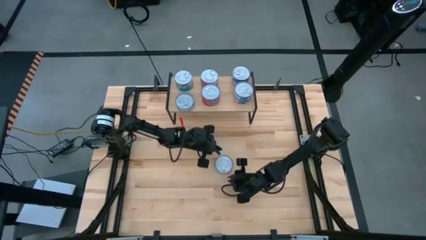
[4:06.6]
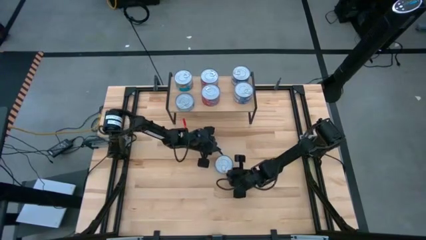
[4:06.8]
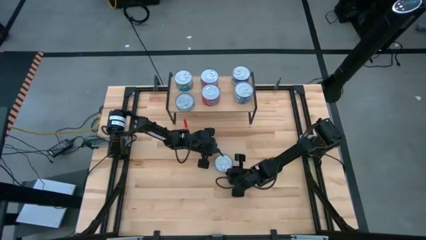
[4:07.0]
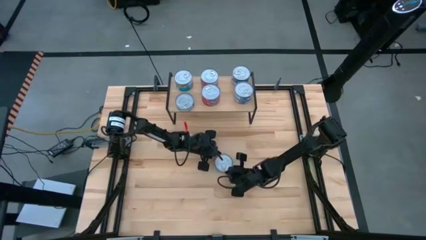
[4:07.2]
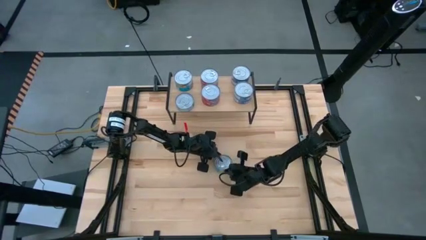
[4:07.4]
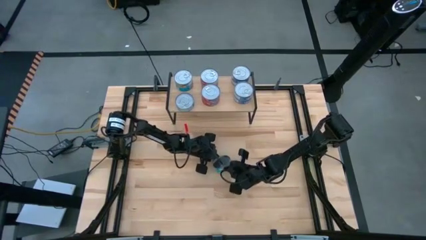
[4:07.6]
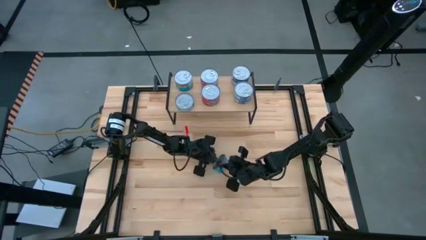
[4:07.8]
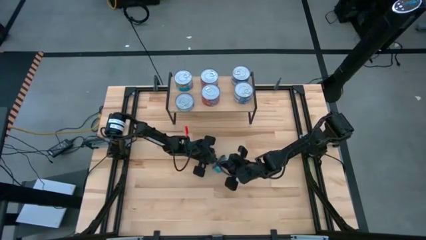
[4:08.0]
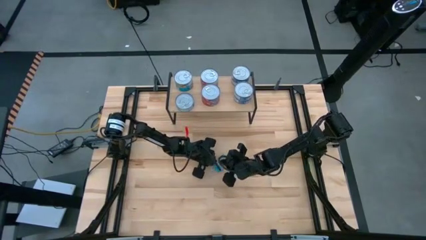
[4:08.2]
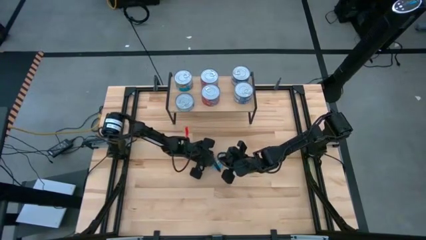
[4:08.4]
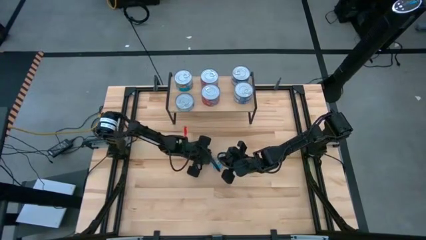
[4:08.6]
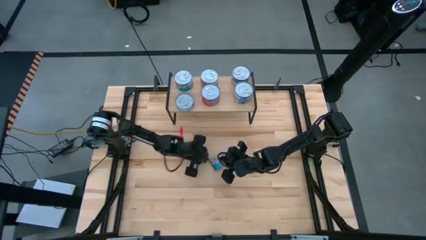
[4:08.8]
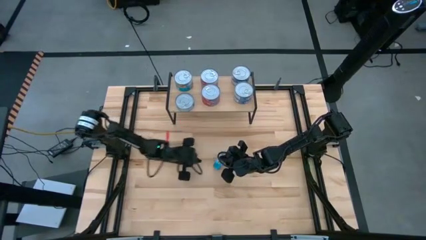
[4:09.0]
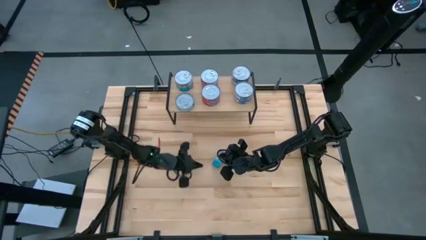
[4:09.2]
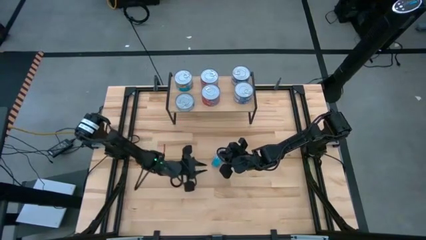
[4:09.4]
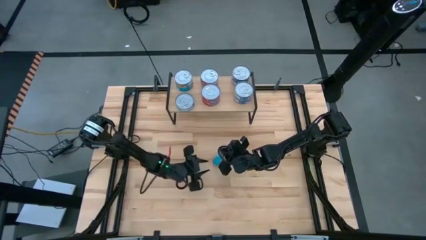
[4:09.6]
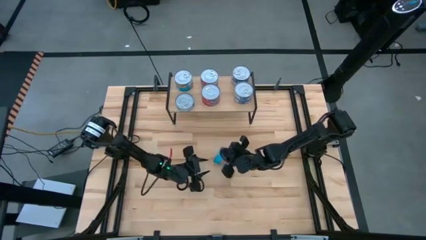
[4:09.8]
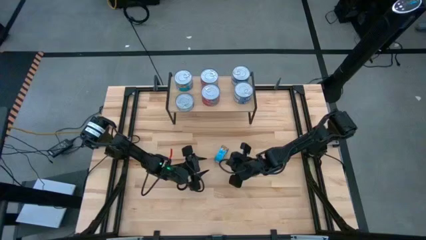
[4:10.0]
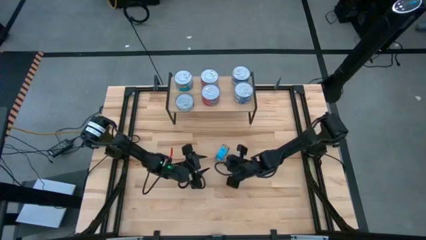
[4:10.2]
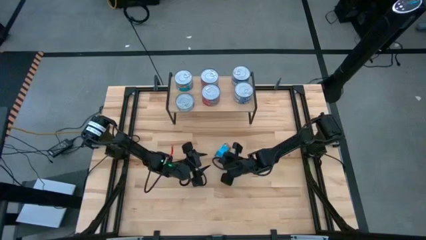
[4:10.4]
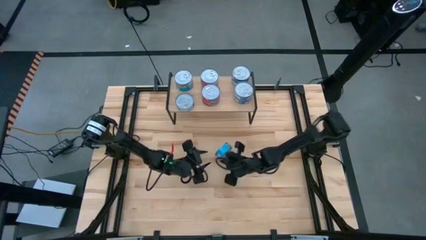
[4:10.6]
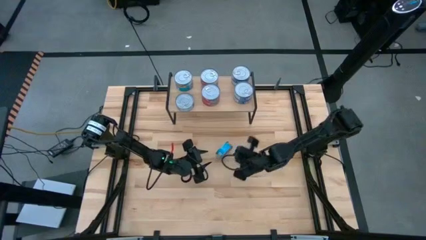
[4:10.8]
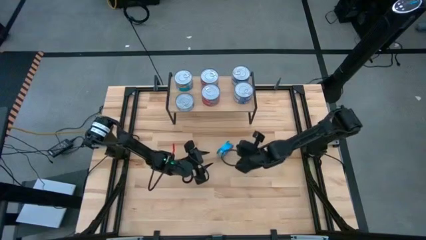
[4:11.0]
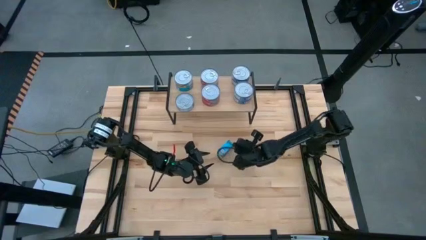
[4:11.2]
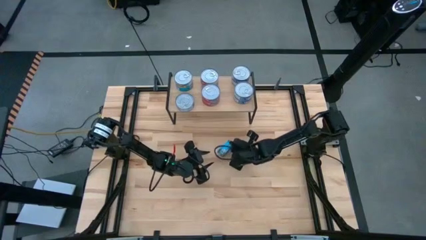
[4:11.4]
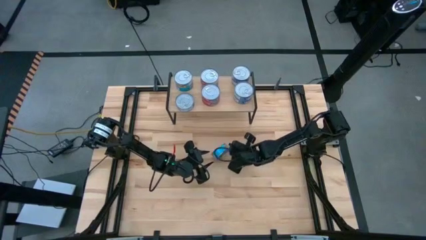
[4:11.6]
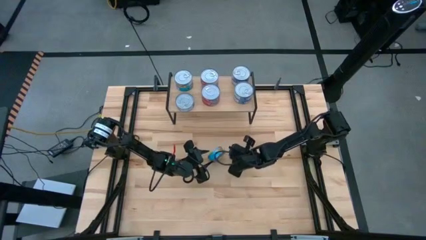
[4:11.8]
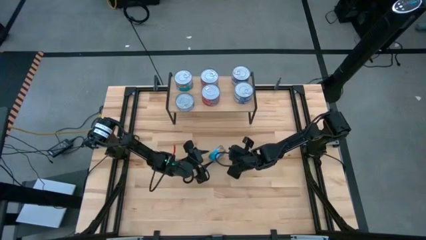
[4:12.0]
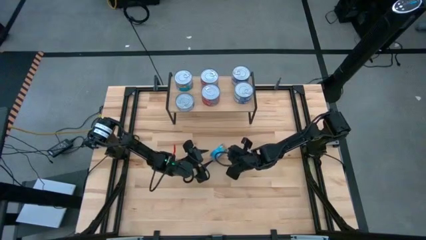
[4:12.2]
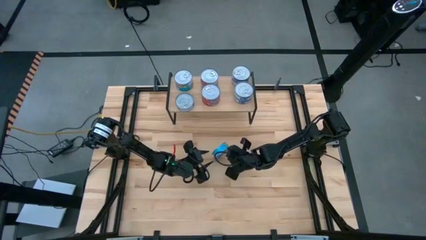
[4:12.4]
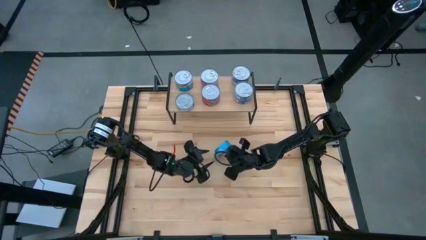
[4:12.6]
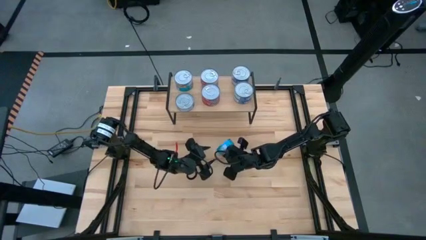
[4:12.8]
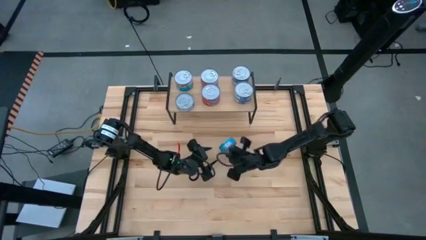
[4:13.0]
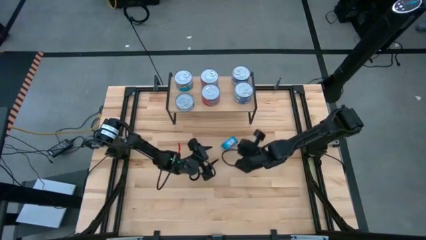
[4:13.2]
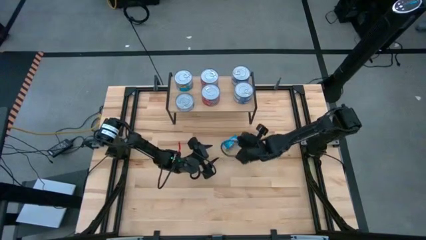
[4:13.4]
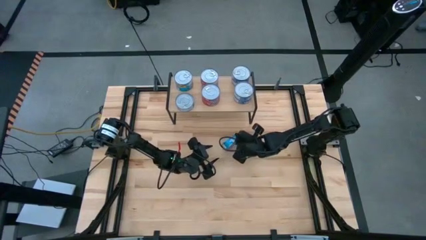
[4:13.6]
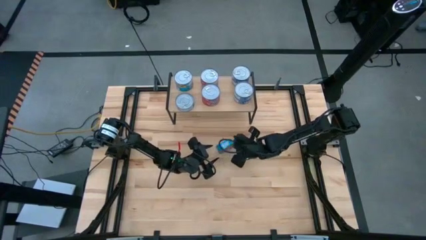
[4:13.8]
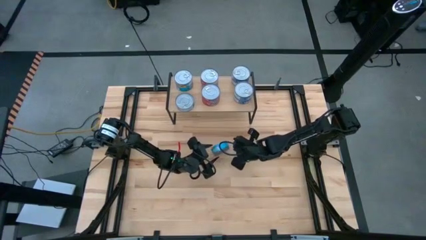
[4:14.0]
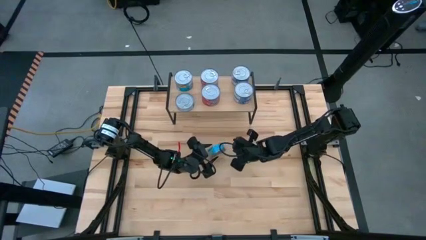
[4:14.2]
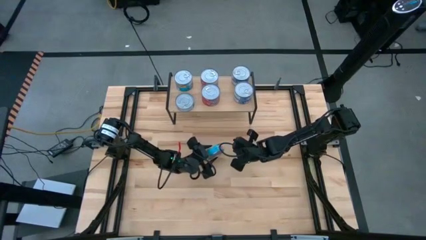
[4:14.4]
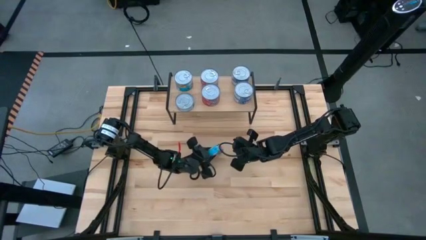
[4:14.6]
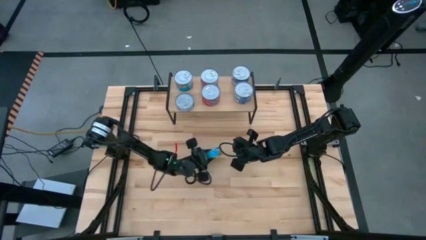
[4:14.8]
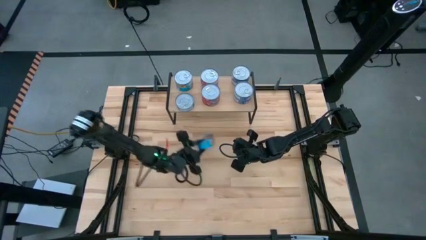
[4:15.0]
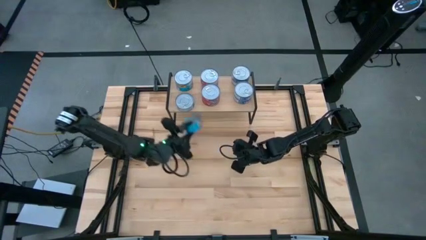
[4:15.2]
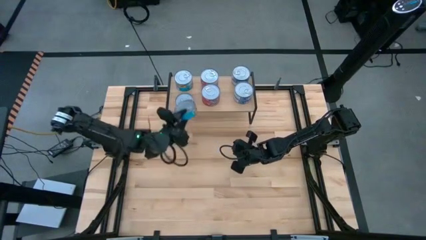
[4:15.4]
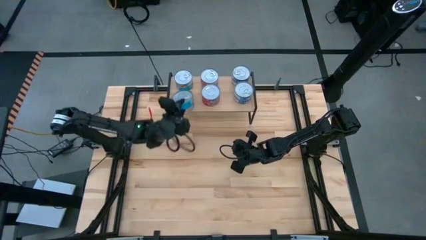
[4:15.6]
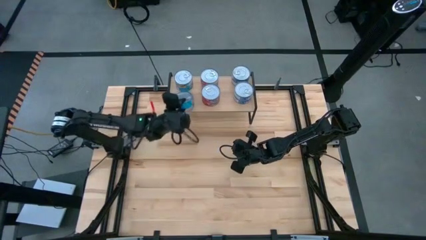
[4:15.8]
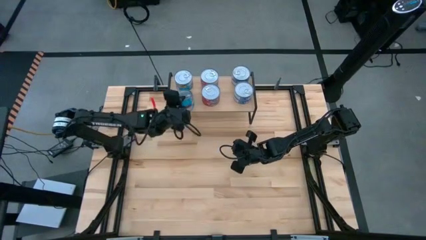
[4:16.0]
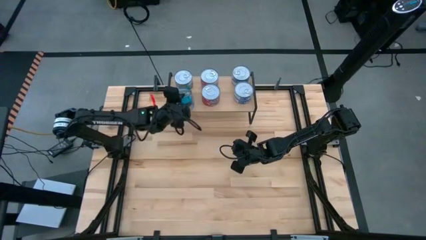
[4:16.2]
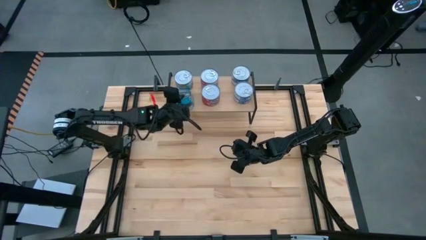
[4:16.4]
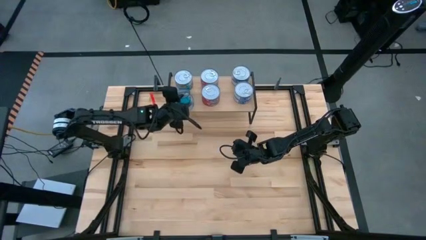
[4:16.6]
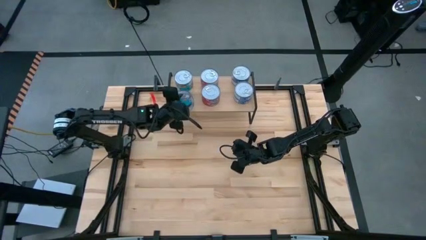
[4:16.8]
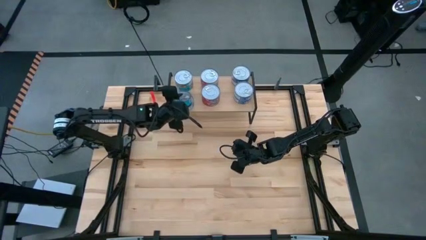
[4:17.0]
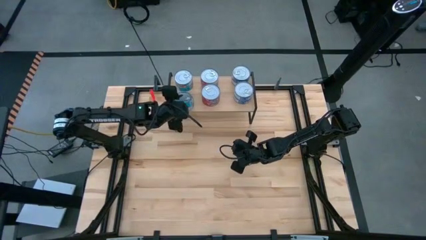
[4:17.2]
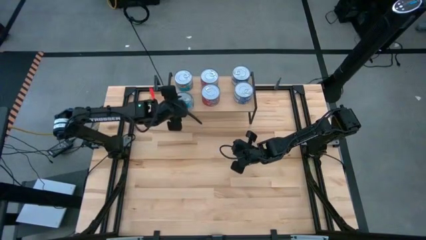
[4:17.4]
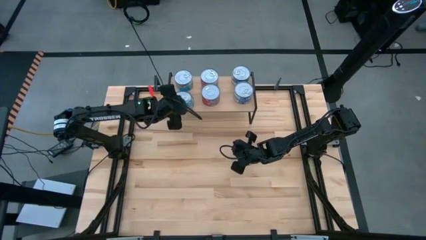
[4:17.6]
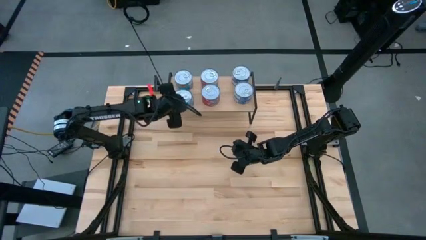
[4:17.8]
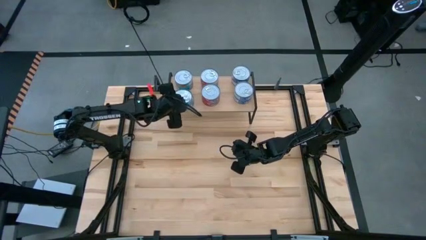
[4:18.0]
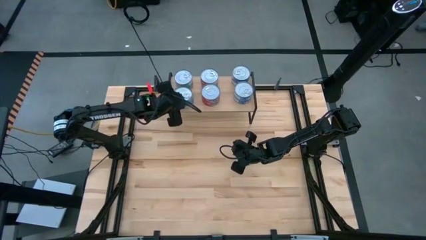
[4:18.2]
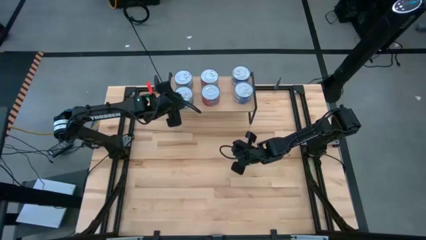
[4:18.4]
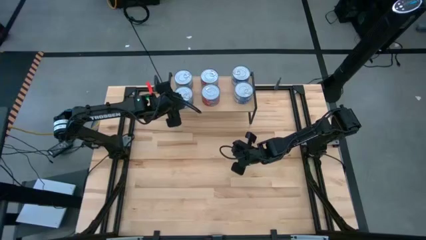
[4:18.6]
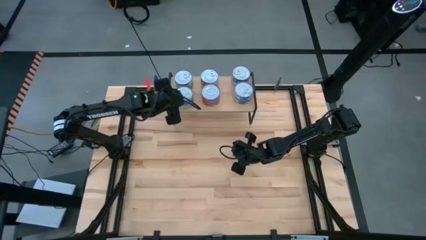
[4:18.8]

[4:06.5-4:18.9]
Task: Stack canned seafood by type on shelf
Stack the yellow blue tuna can on top of the other yellow blue tuna can on the shelf

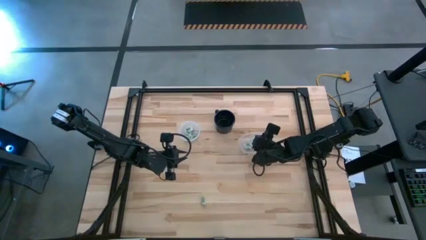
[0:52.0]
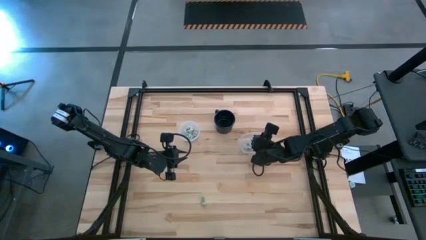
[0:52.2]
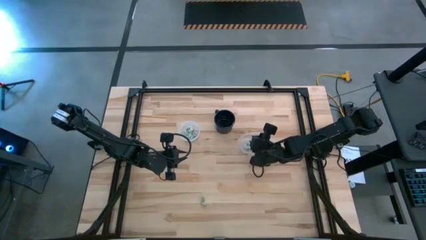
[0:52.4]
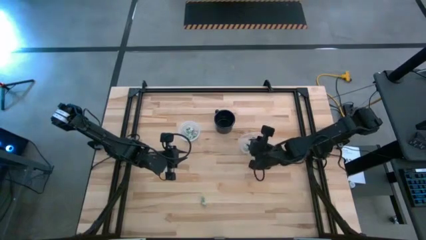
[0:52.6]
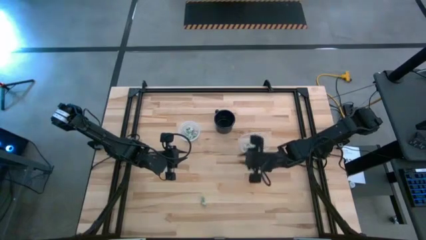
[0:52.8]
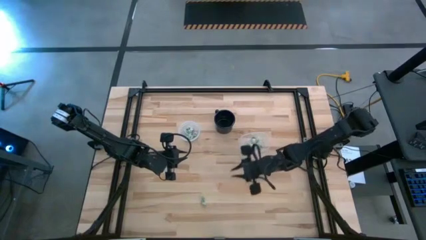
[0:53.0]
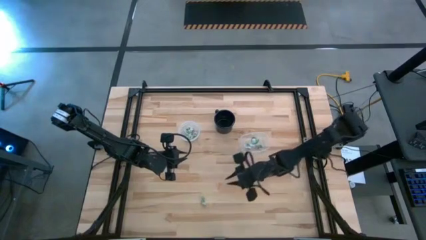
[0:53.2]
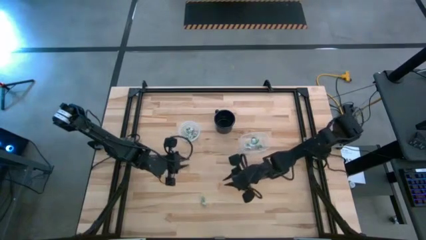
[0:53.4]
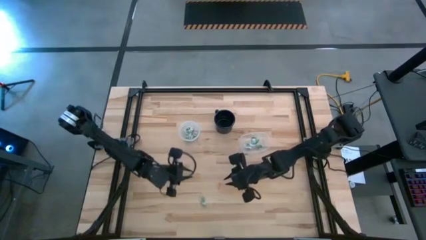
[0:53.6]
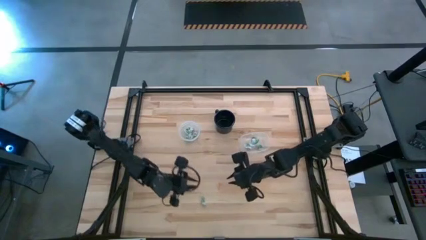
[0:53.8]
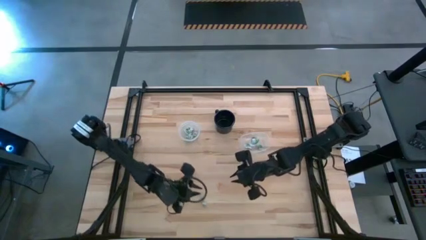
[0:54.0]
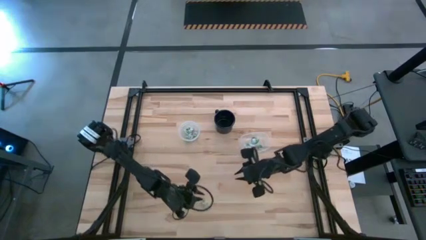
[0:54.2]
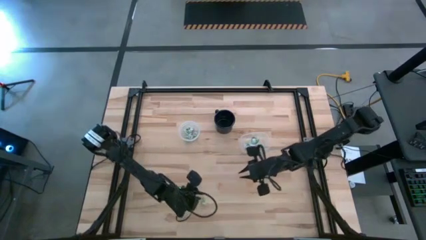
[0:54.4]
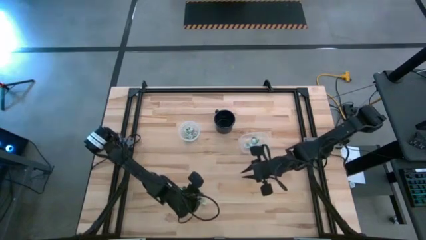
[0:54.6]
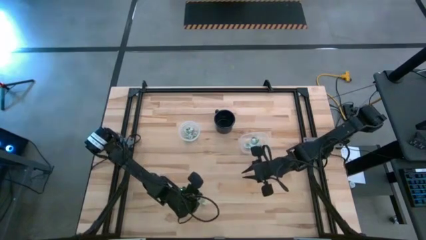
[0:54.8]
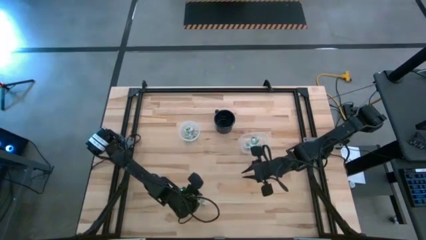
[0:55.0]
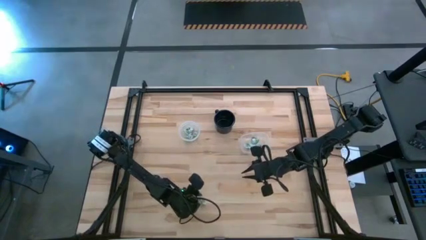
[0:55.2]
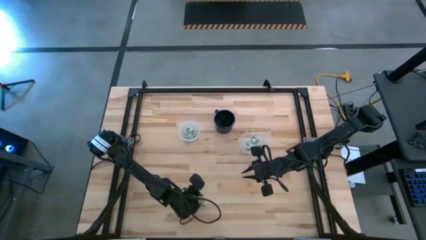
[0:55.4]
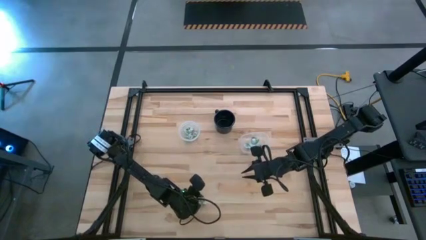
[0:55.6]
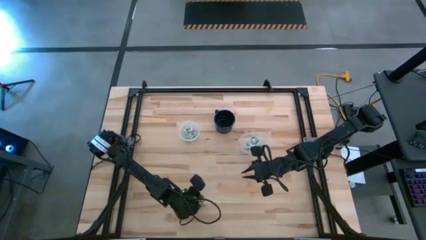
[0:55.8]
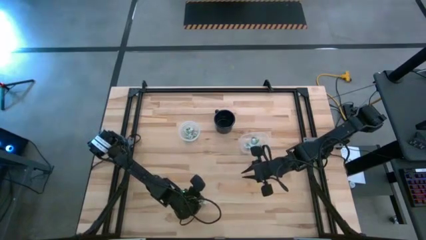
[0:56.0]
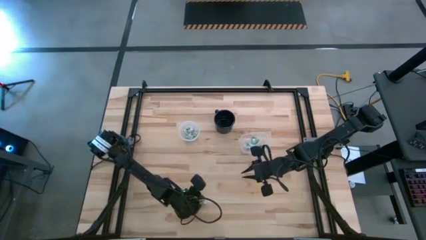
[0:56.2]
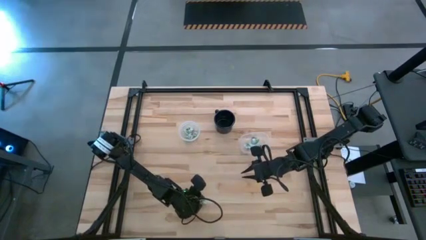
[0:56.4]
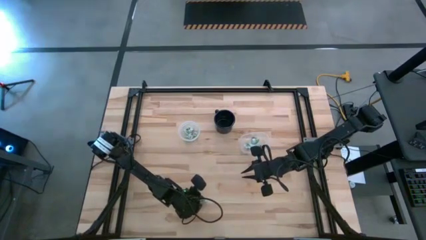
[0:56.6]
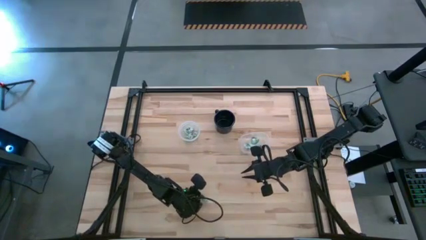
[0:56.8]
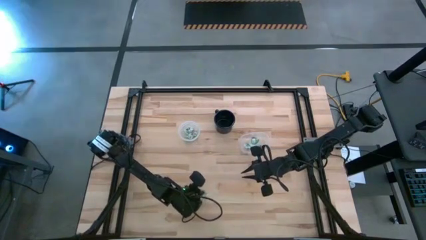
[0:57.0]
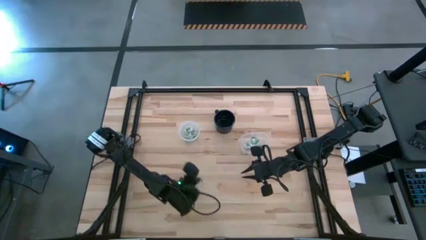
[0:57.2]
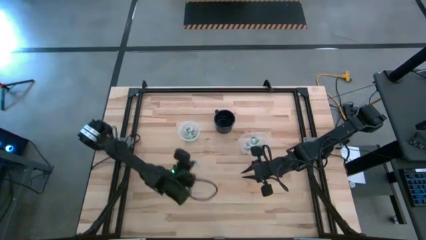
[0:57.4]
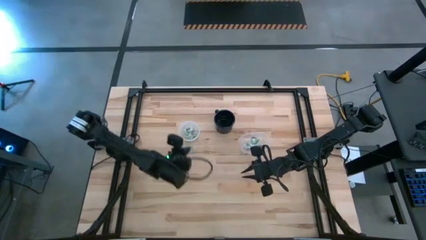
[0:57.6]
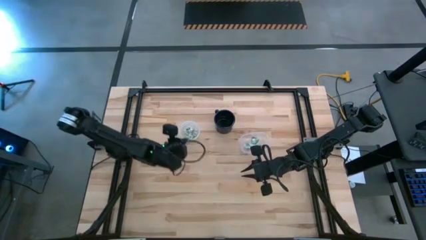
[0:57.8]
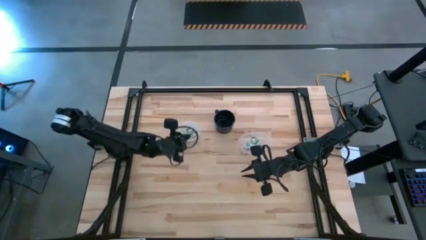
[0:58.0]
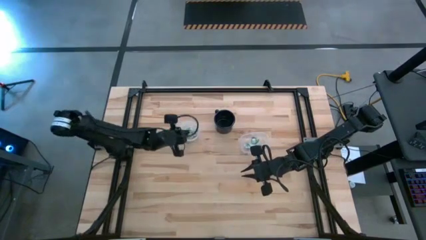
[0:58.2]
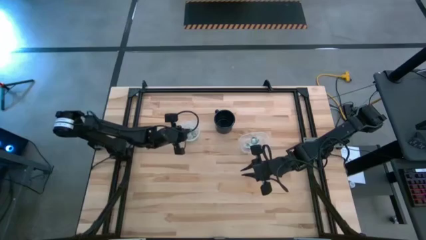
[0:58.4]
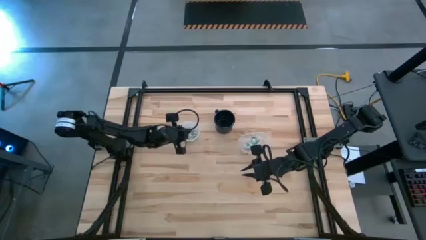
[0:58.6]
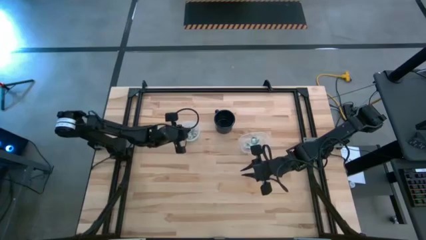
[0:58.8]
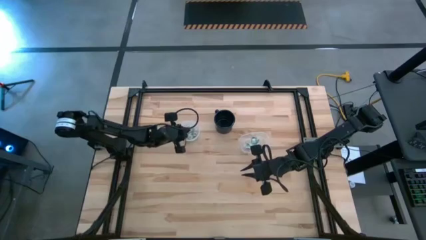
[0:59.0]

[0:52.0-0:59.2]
Task: Pick and place items into bin
Put the stevia packet into the left transparent bin
